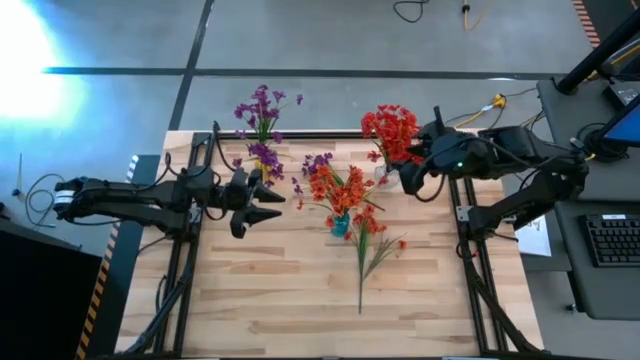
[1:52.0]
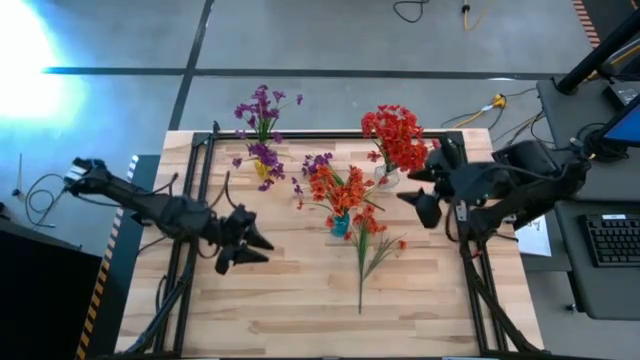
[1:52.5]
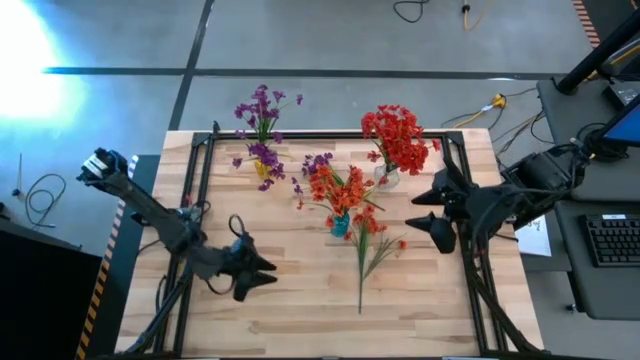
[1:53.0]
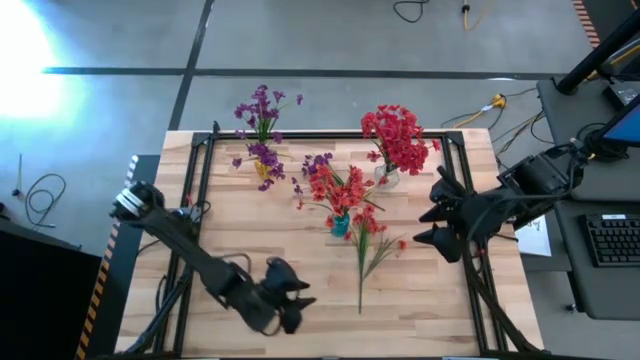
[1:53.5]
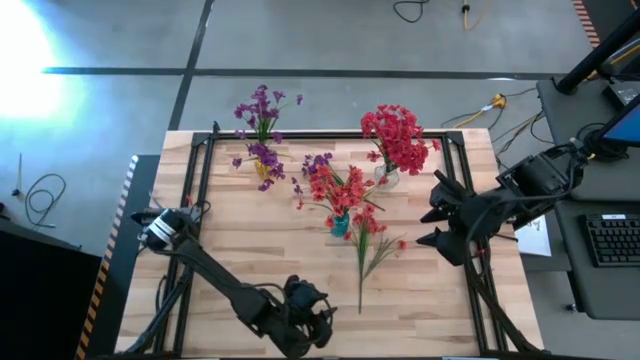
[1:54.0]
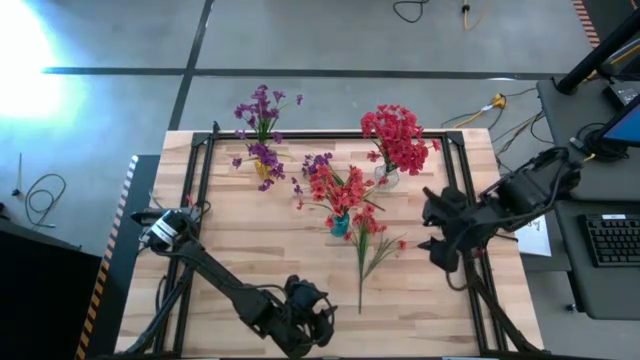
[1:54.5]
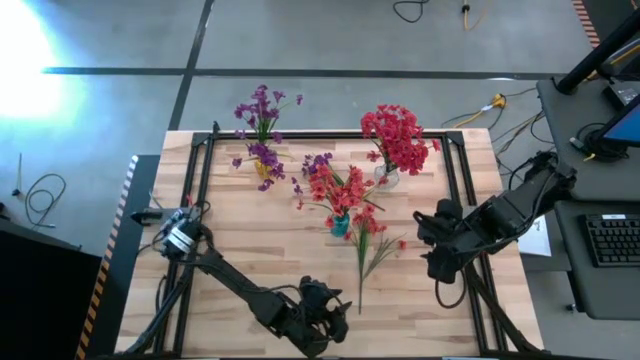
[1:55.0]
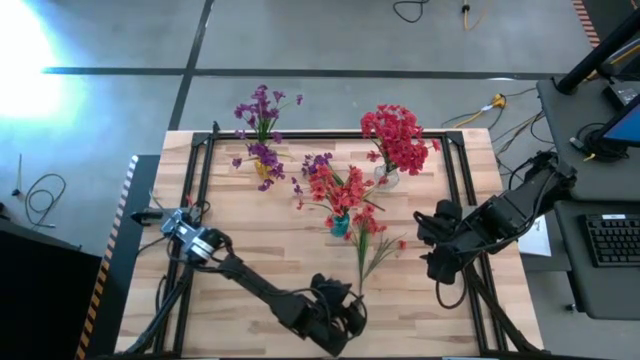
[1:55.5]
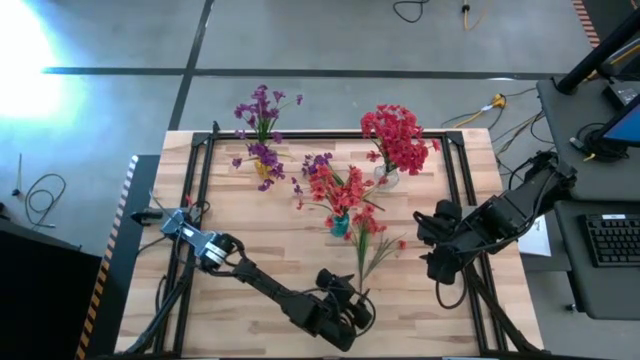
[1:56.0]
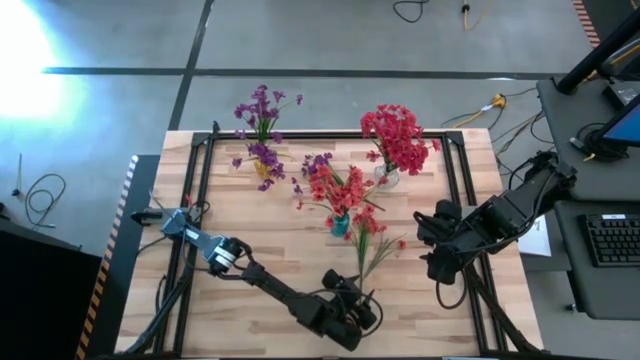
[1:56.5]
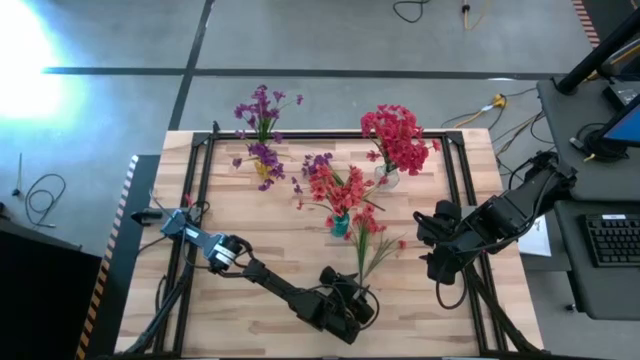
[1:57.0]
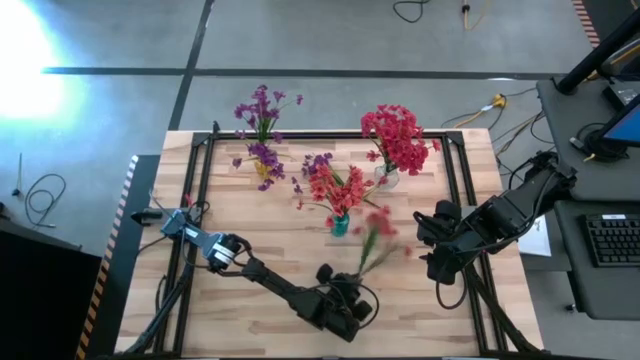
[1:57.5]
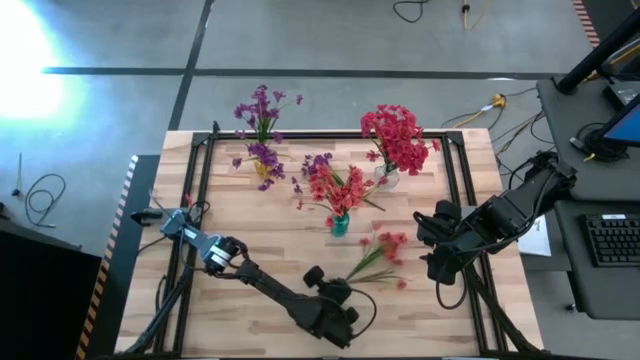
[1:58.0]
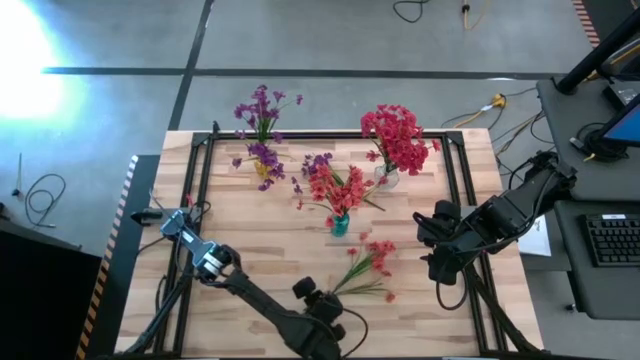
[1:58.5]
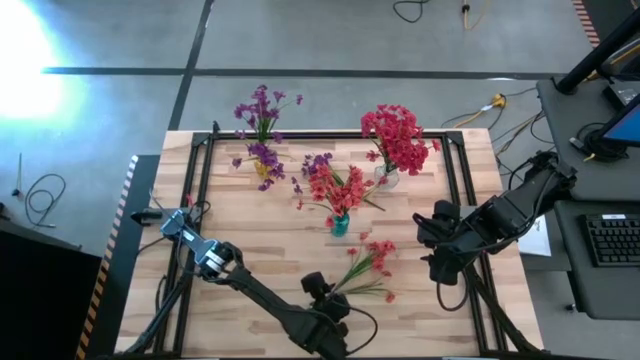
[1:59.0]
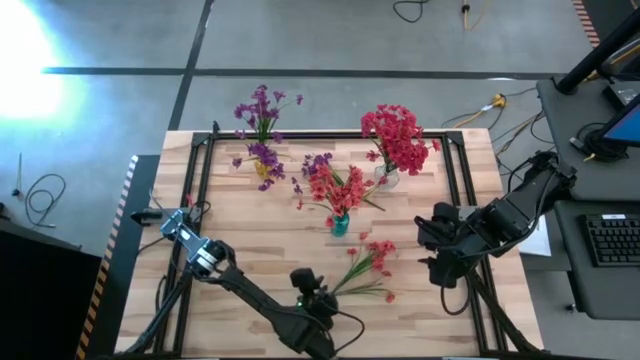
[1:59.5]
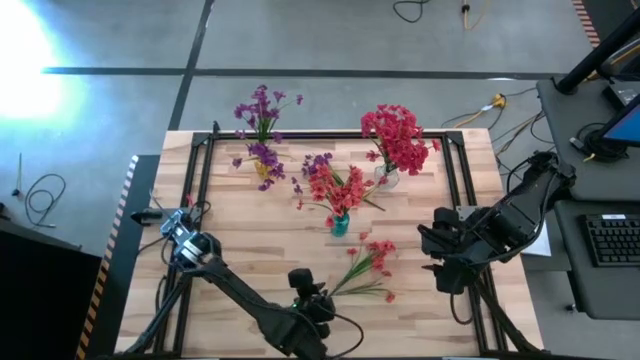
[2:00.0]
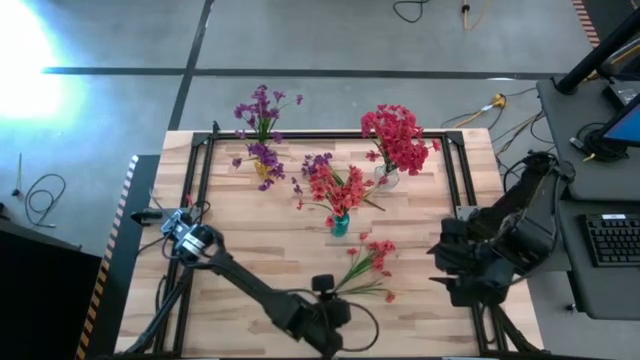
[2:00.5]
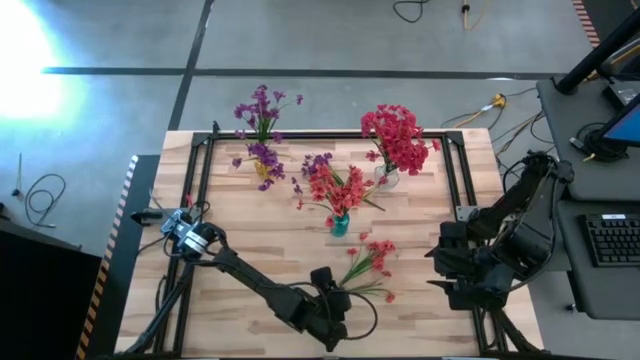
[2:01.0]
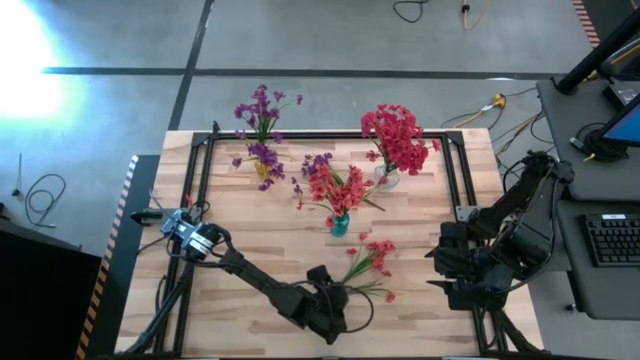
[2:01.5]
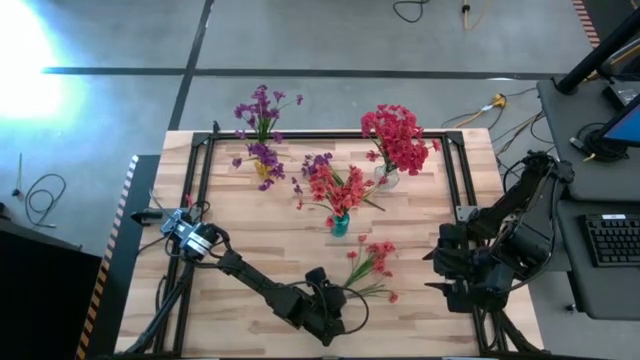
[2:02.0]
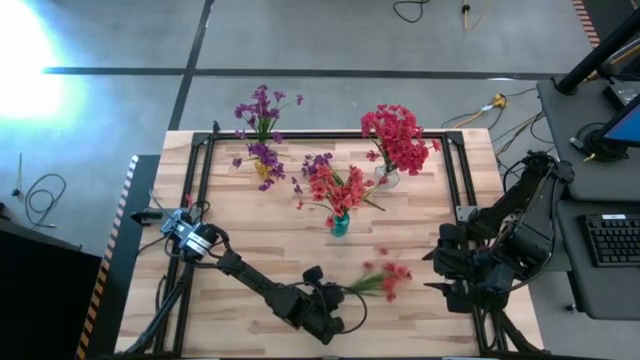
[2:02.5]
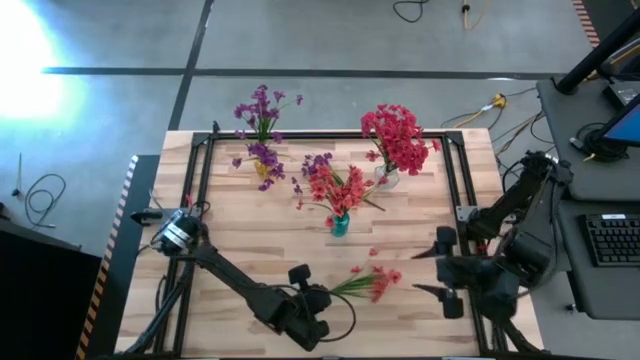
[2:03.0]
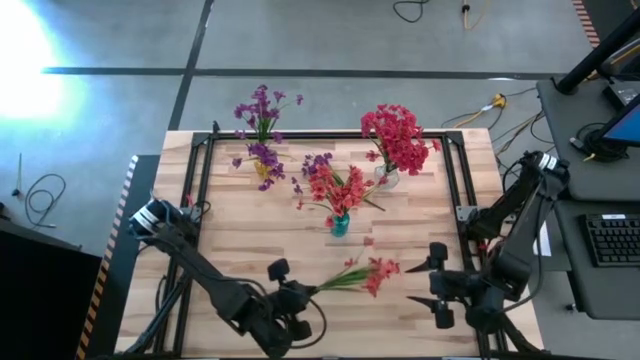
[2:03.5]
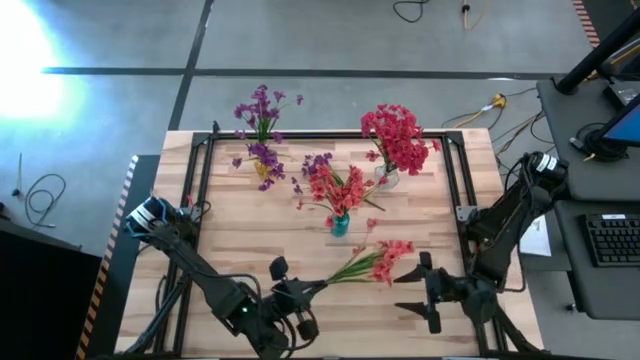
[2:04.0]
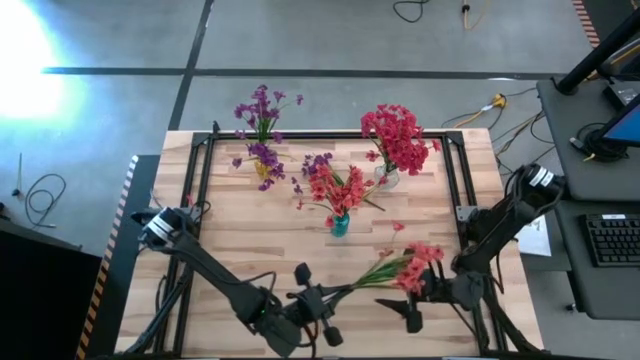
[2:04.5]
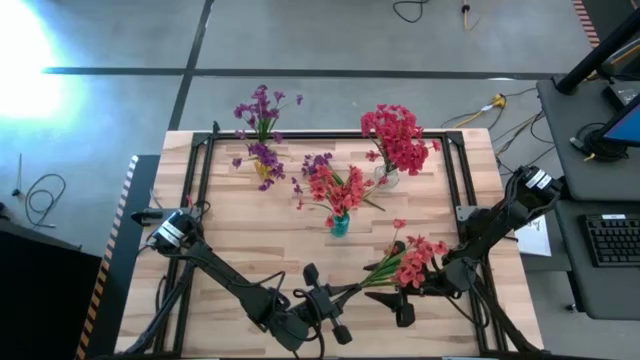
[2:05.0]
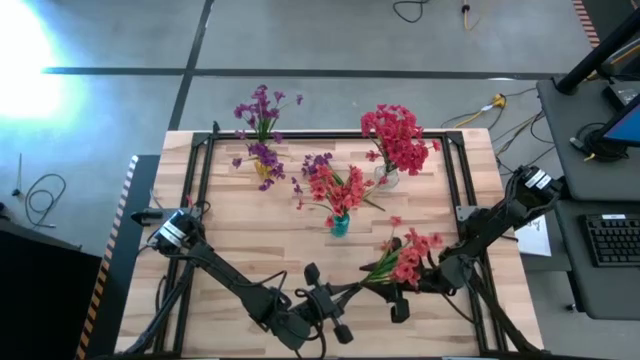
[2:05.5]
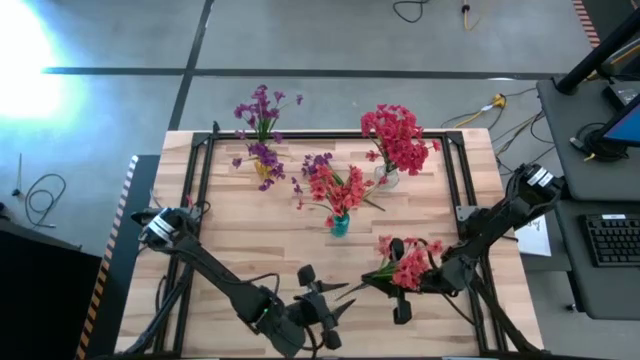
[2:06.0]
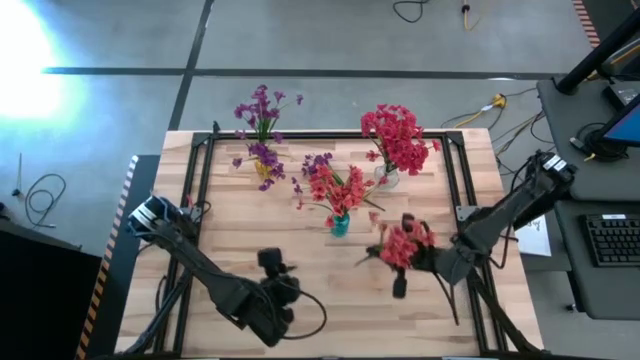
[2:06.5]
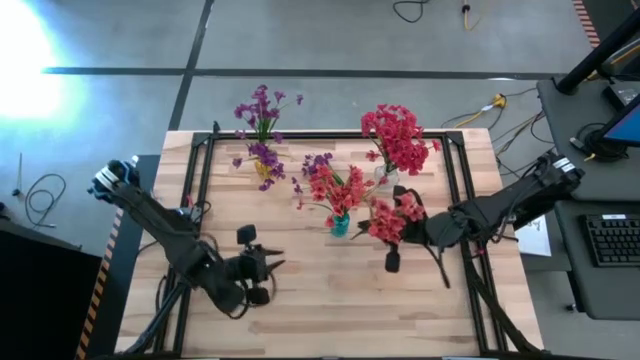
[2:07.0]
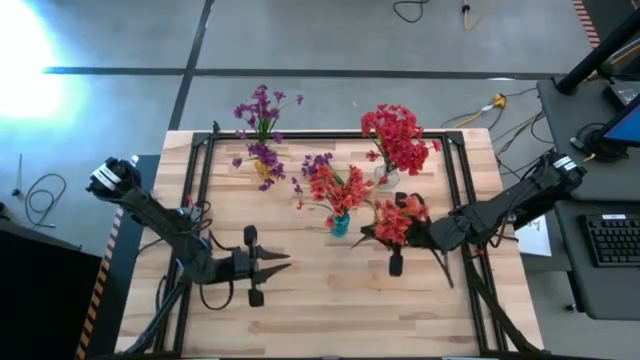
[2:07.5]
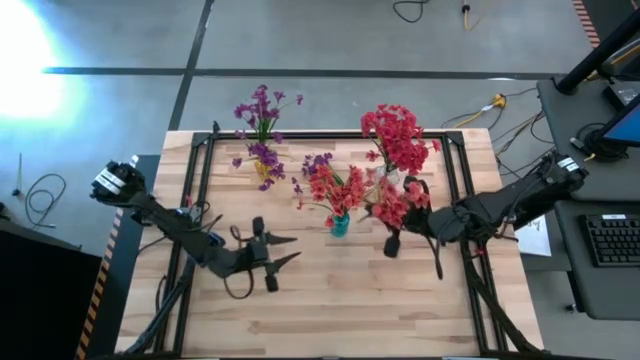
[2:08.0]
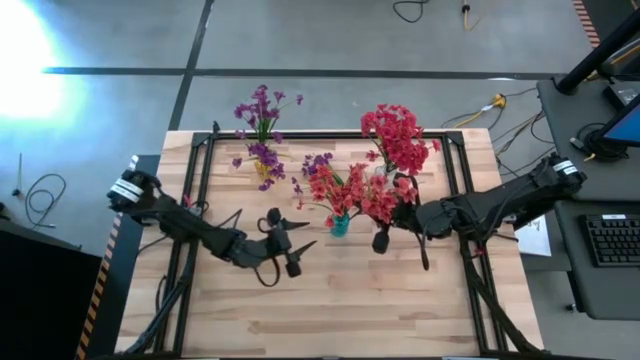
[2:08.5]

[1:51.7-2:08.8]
Task: Sort flowers into vase by color
Put the orange flowers into the blue vase

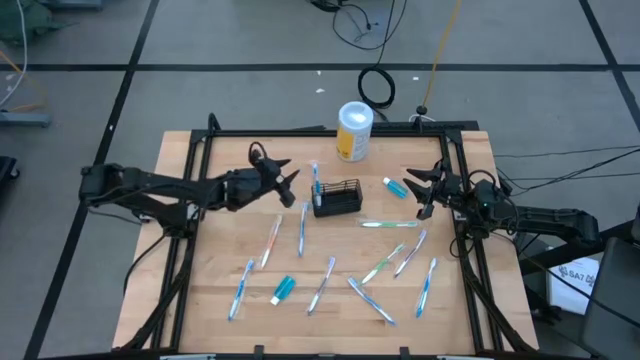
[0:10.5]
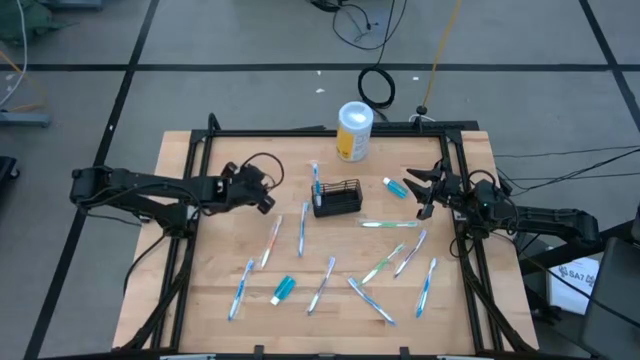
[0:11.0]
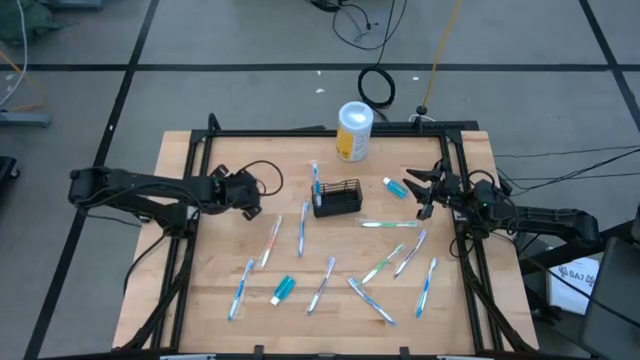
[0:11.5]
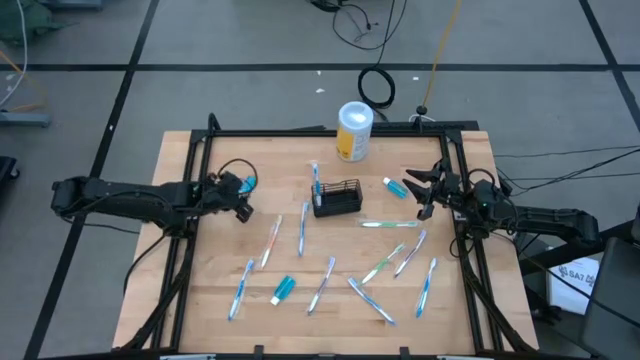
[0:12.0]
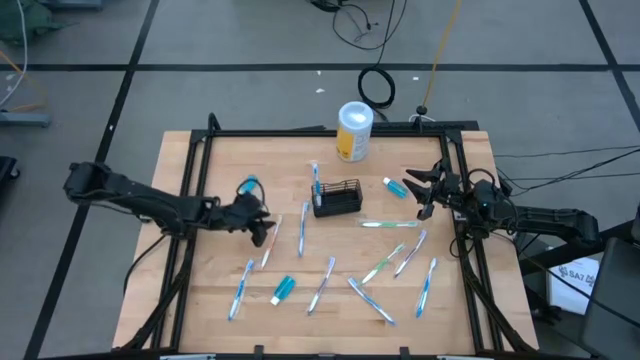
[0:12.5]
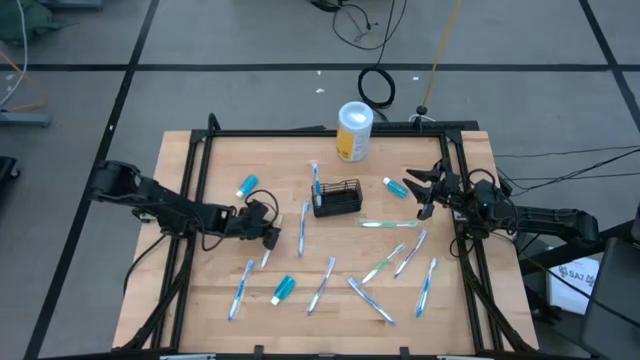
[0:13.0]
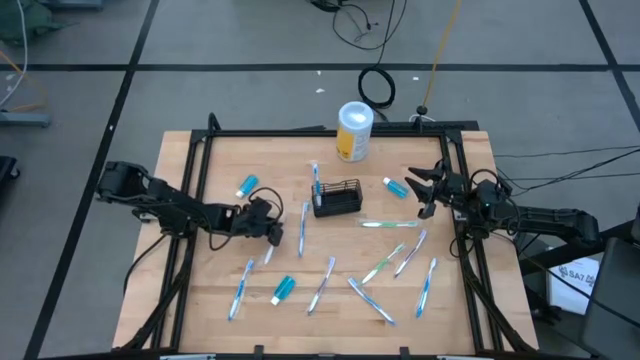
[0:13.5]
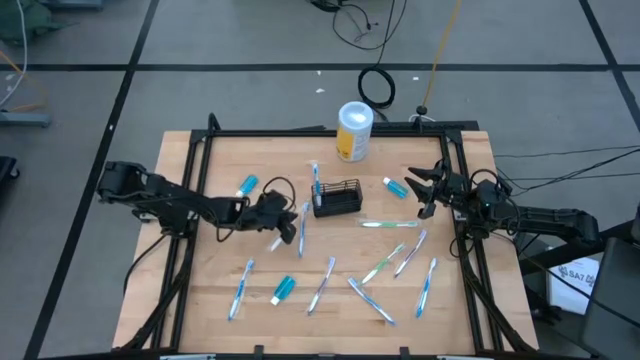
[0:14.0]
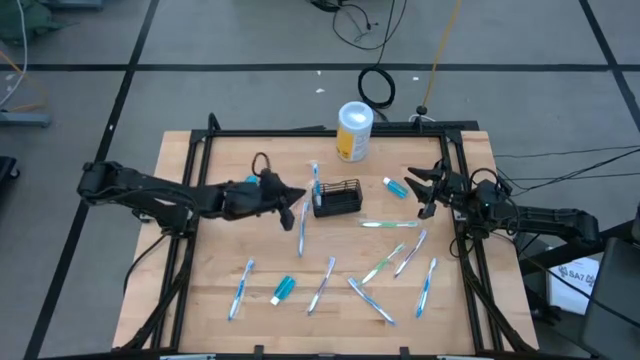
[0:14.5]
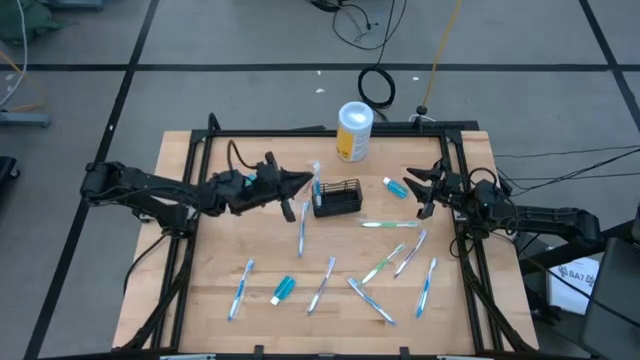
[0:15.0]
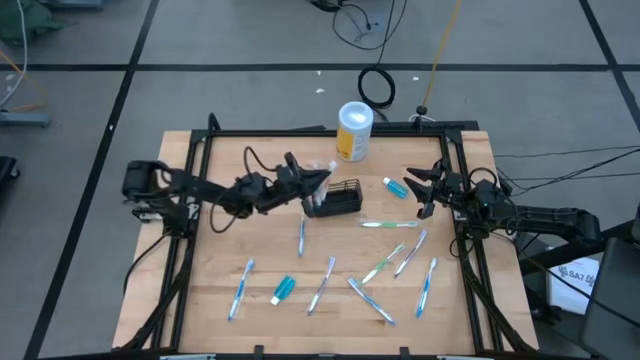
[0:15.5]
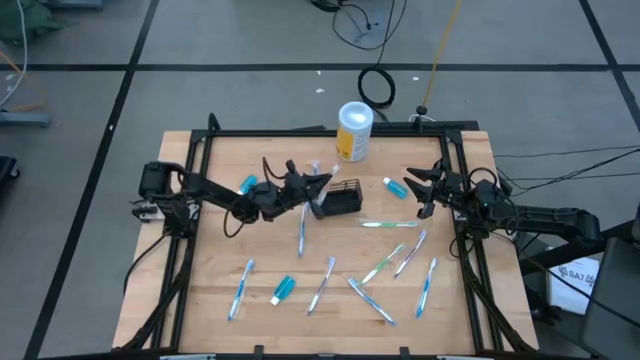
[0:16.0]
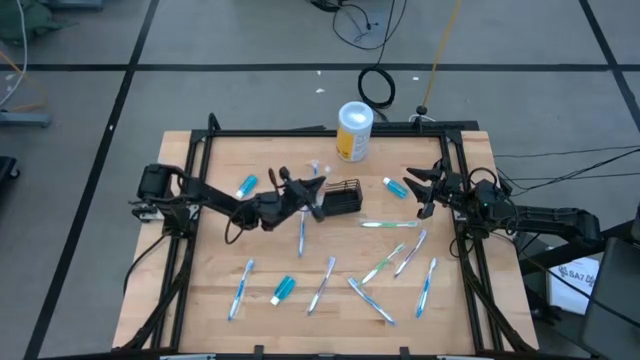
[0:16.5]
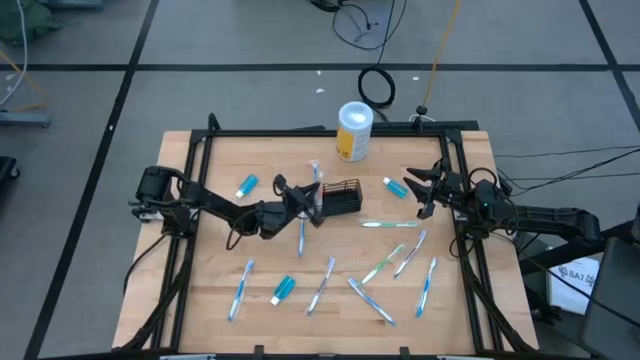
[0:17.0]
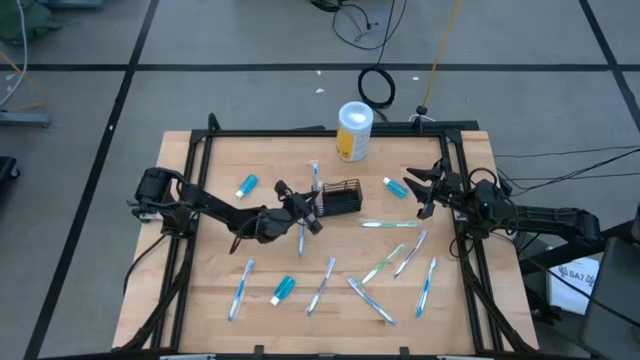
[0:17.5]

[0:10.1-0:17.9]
Task: Pick & Place toothbrushing station
Put the orange toothbrush into the black wire organizer
